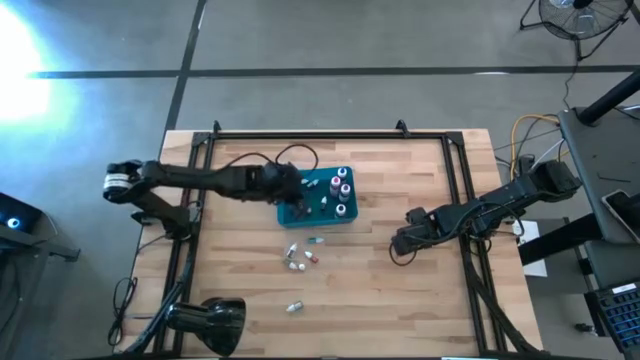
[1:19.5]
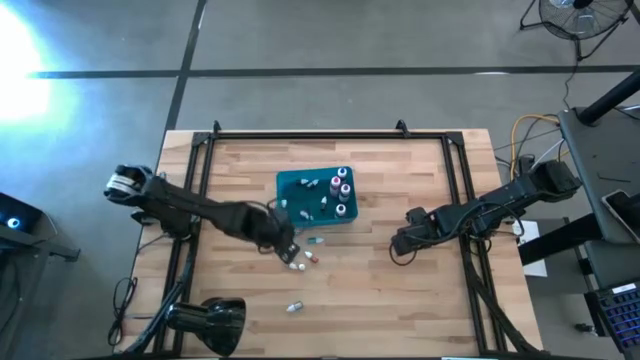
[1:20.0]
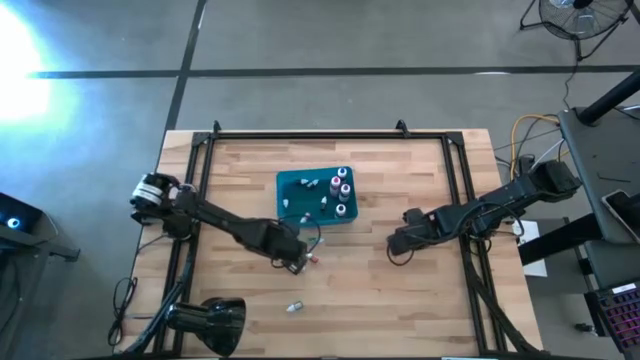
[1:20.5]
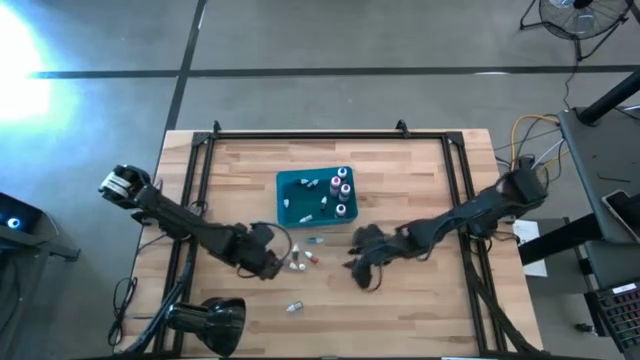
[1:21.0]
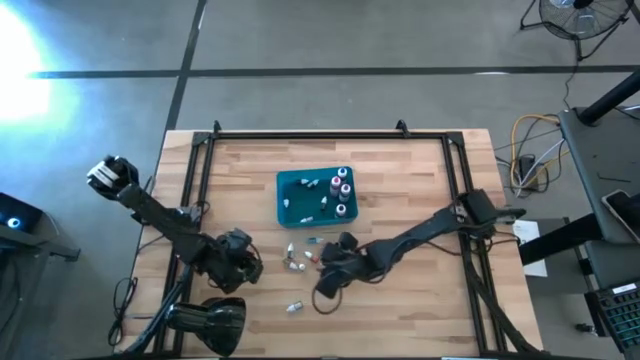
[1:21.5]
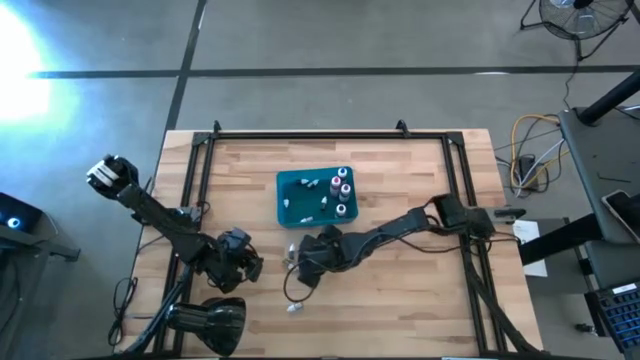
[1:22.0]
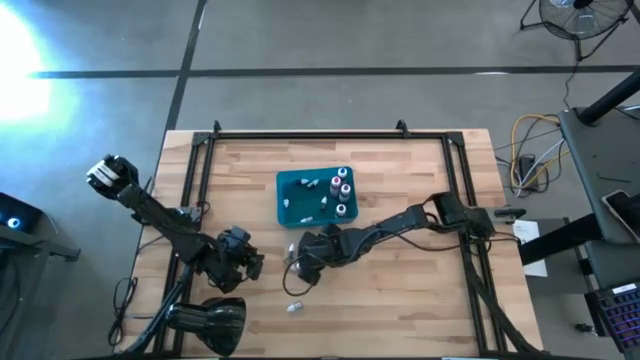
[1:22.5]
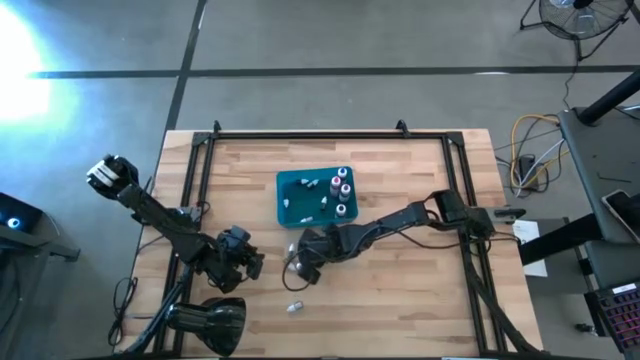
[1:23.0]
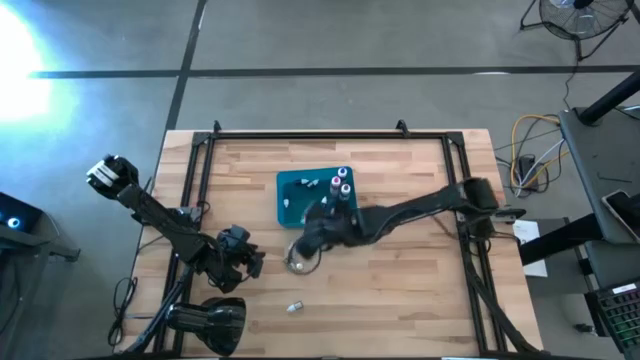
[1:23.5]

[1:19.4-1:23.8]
Task: Pick & Place food coloring
Put the small brown food coloring bottle into the blue bin

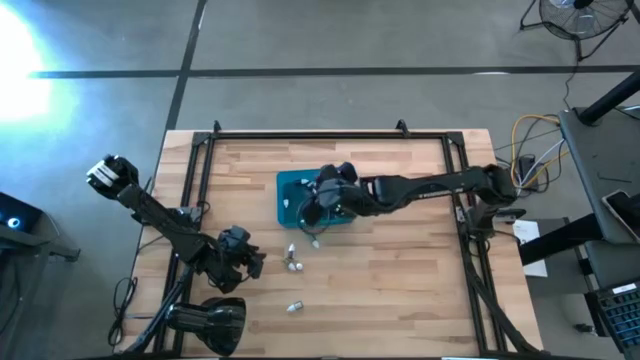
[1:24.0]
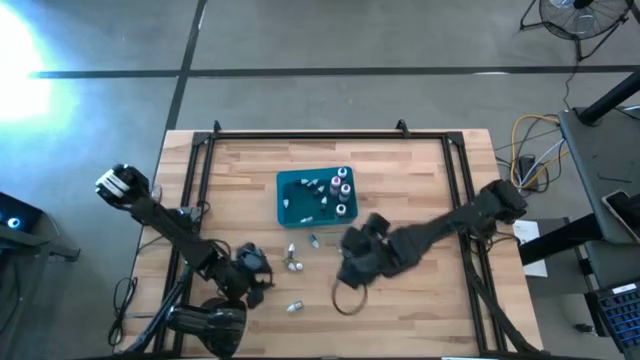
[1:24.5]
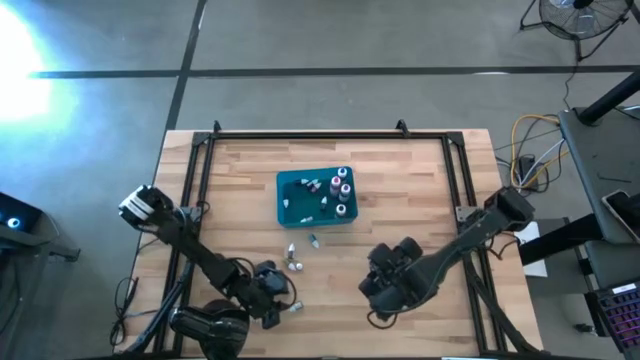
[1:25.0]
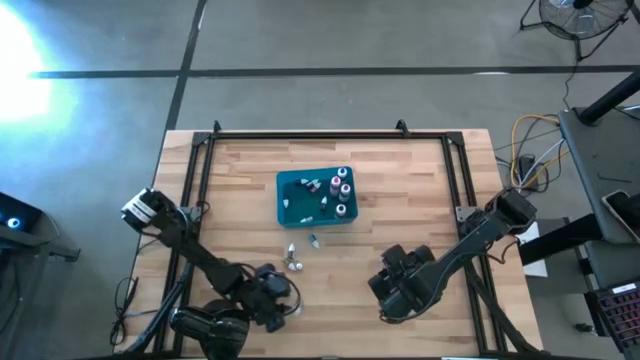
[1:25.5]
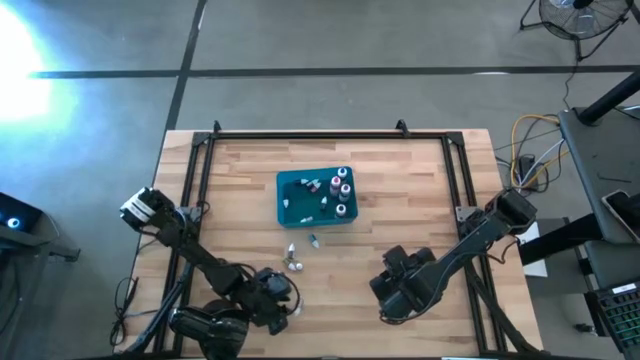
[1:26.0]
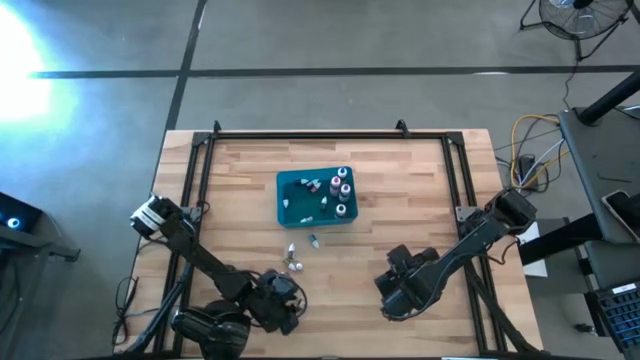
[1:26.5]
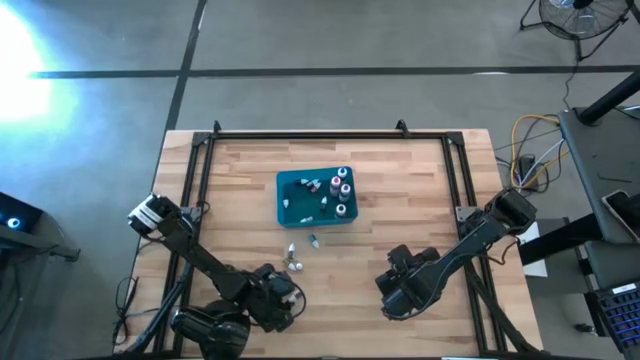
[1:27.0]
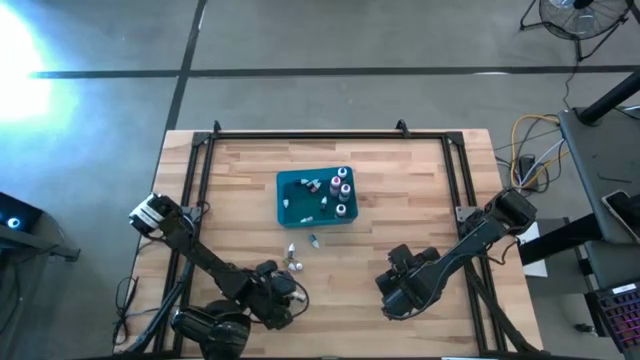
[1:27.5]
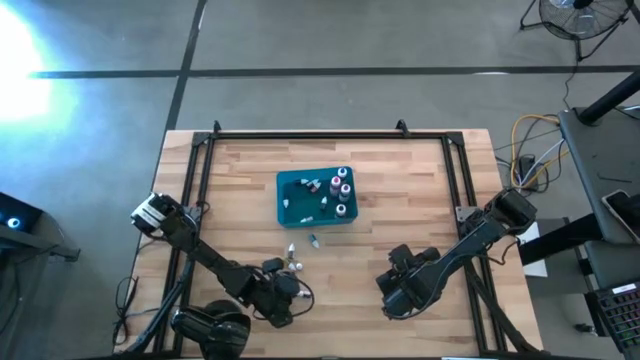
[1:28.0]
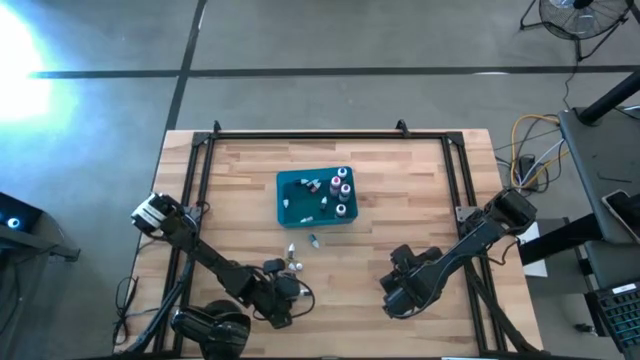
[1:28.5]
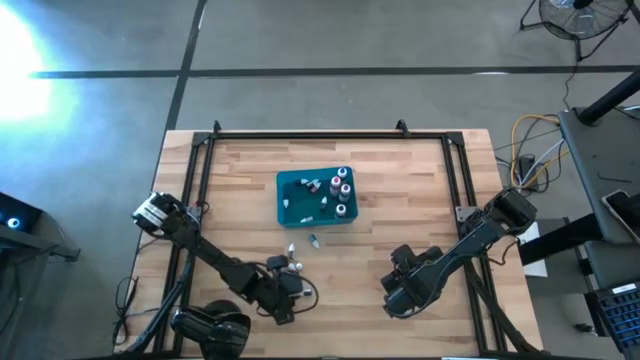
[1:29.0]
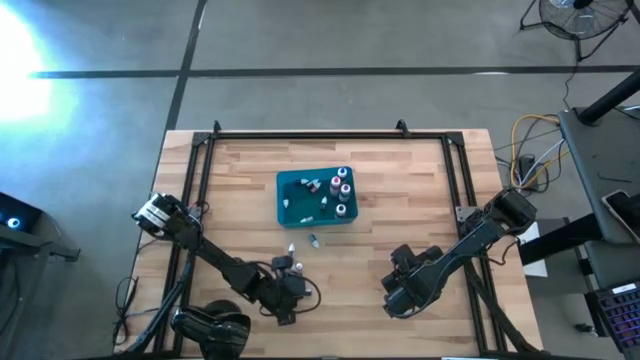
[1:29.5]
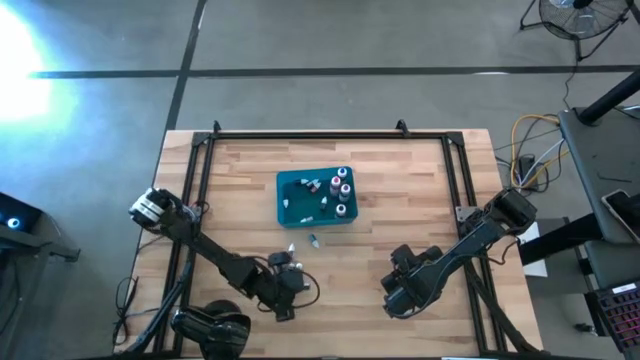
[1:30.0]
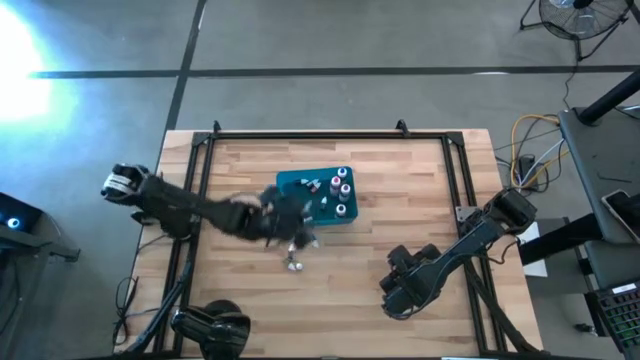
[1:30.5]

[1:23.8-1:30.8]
Put the small black food coloring bottle into the blue bin

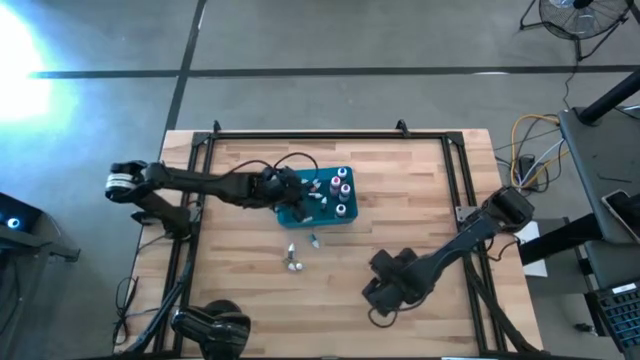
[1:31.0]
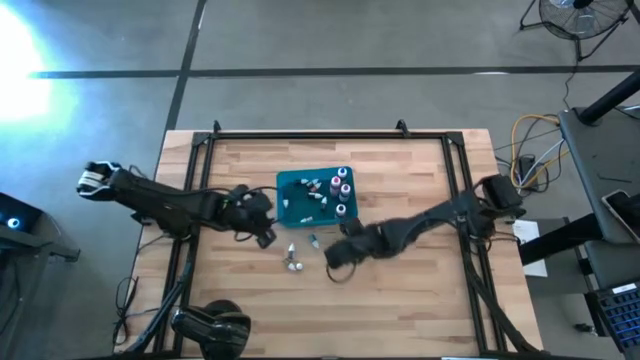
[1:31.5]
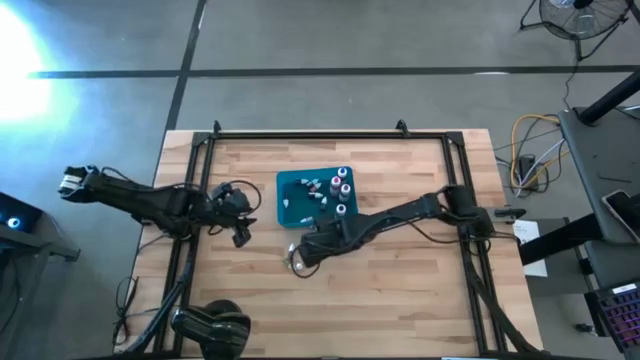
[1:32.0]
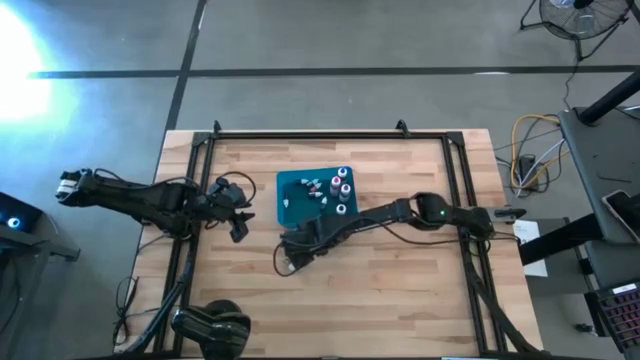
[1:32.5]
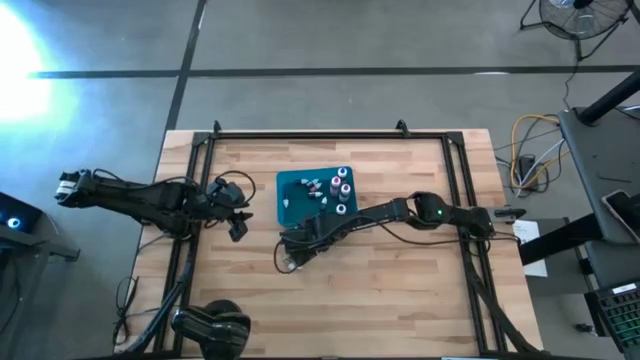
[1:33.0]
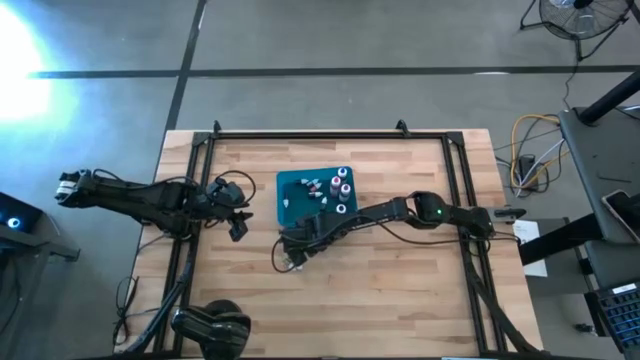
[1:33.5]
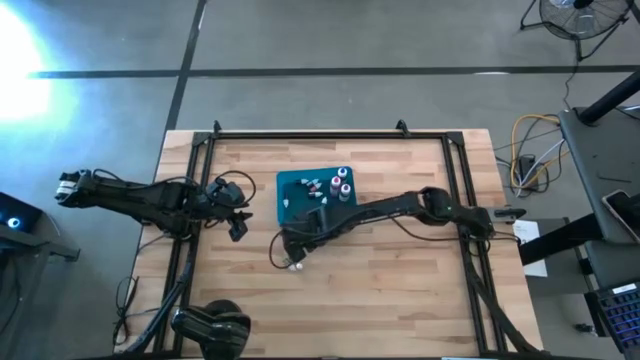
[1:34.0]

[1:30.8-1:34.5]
Put the small sky blue food coloring bottle into the blue bin

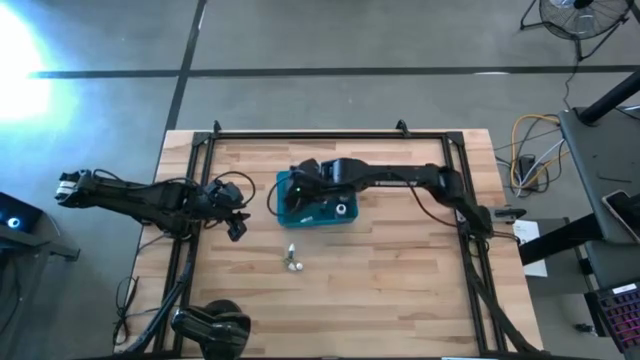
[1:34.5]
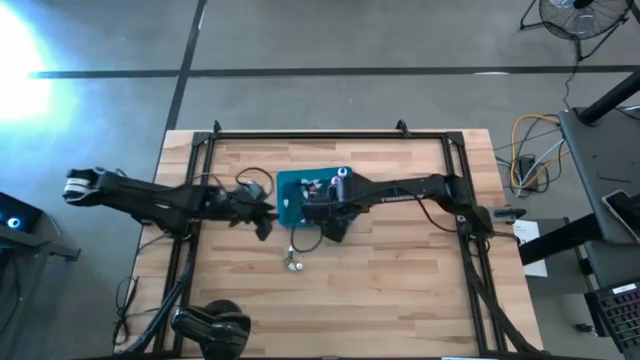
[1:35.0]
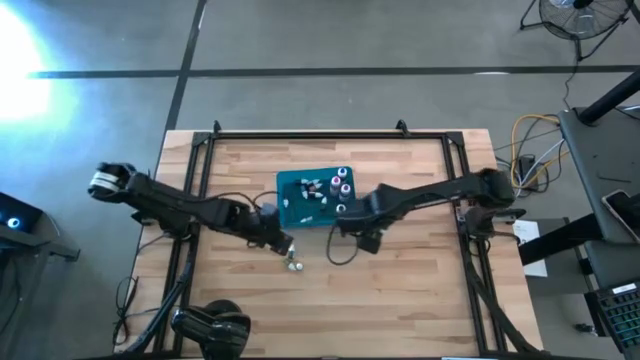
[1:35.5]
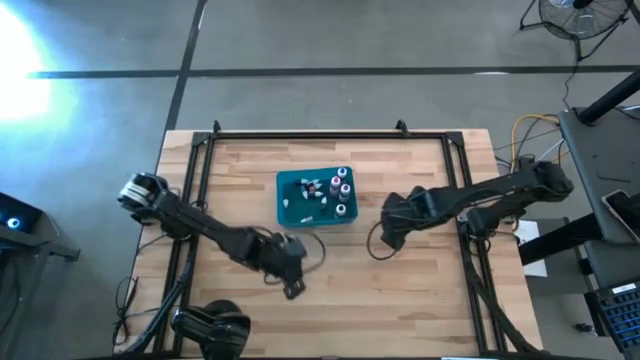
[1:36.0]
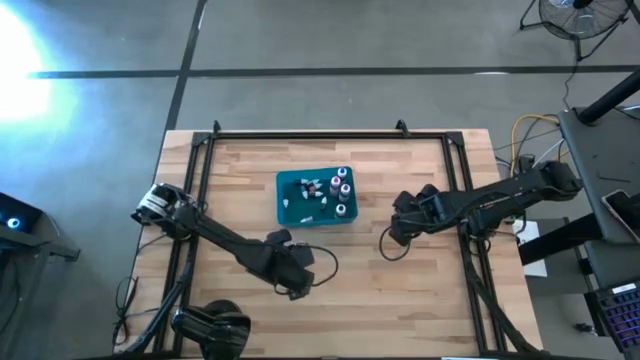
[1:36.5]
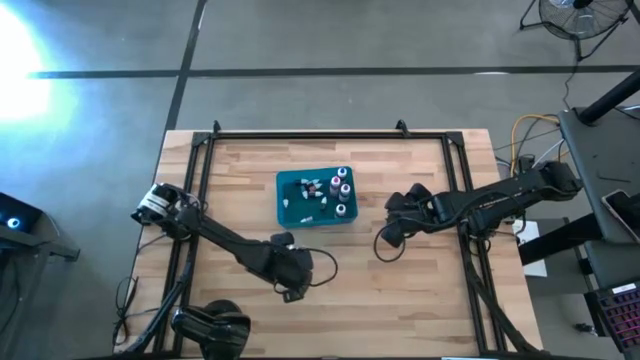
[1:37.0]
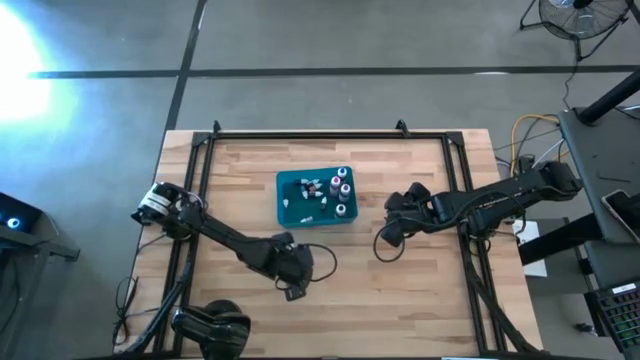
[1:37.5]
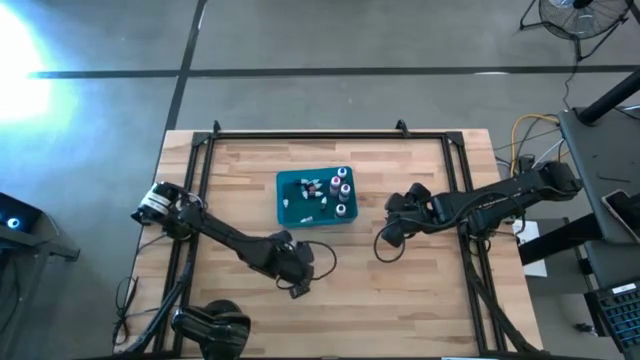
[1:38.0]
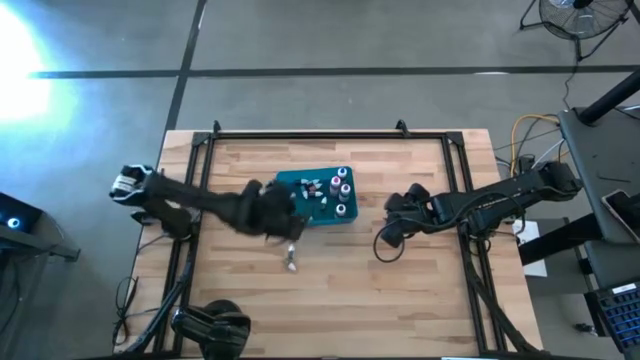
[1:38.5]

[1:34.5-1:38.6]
Put the small light green food coloring bottle into the blue bin

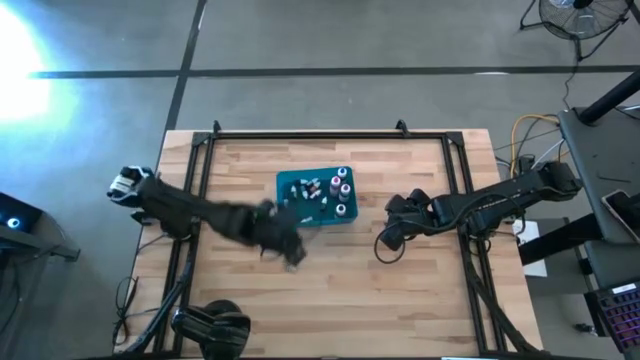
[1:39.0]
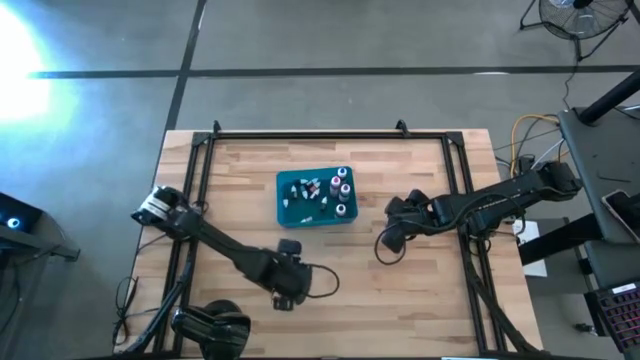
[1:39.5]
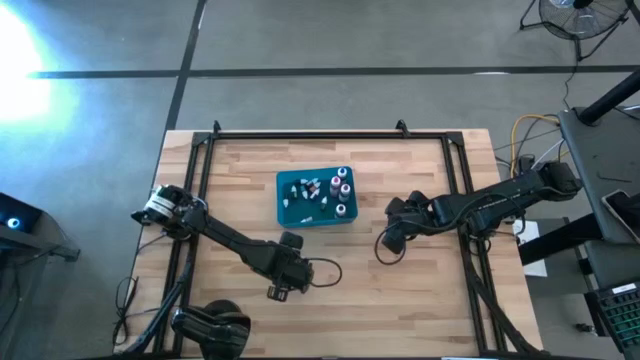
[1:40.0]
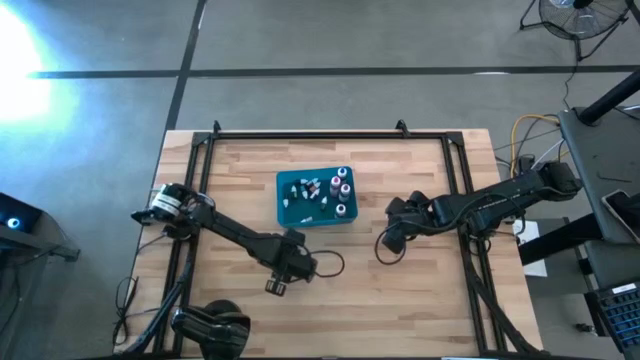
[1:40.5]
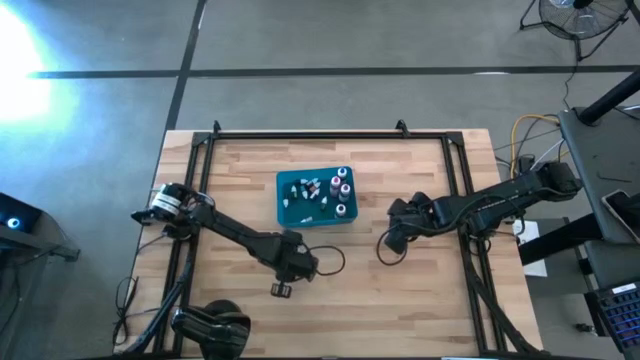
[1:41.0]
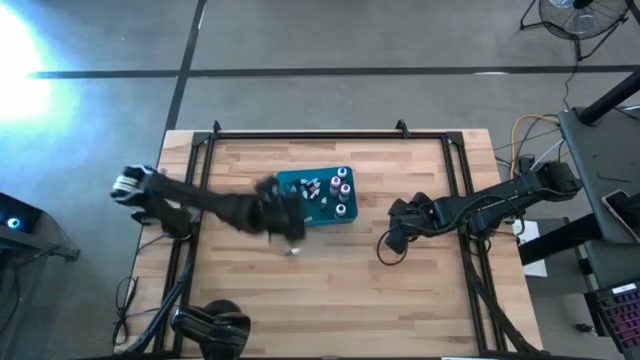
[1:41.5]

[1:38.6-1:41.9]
Put the small light green food coloring bottle into the blue bin
